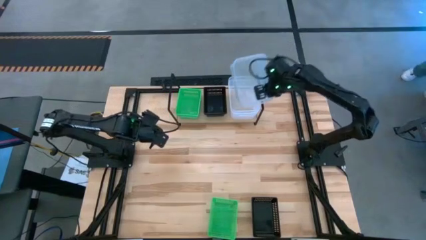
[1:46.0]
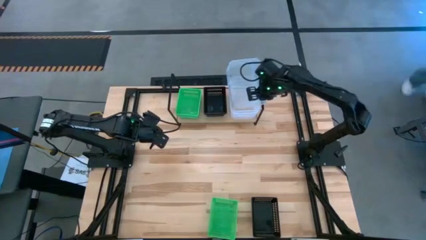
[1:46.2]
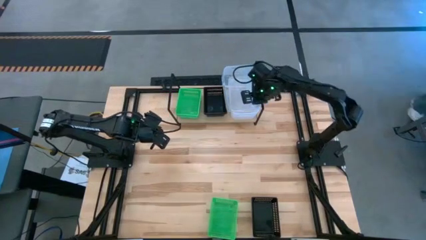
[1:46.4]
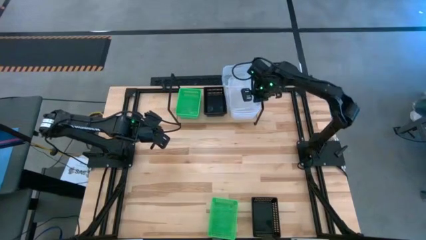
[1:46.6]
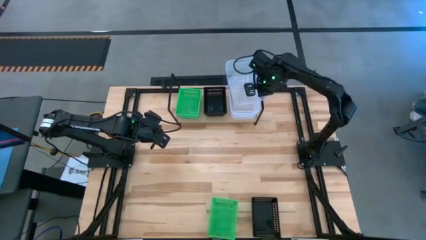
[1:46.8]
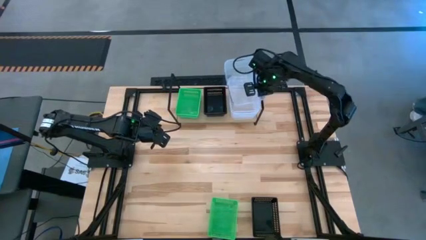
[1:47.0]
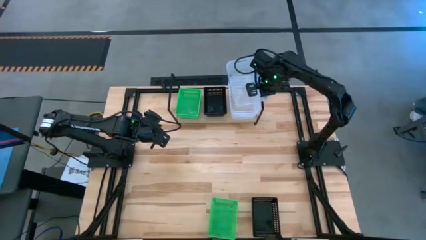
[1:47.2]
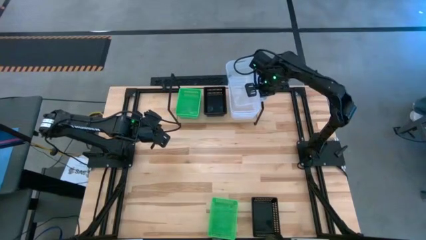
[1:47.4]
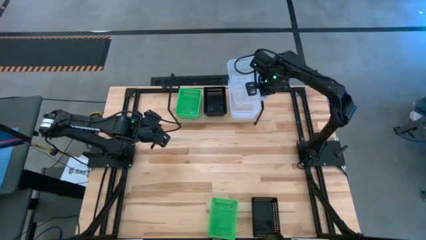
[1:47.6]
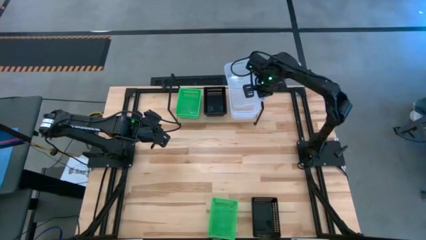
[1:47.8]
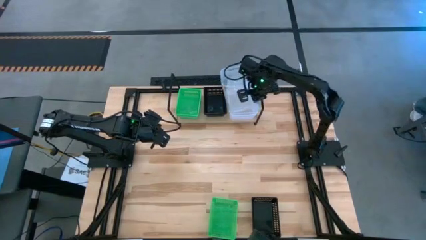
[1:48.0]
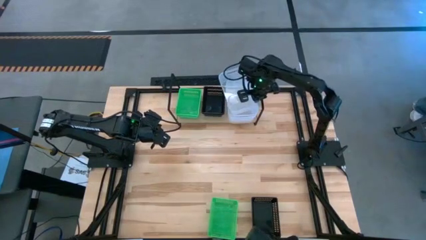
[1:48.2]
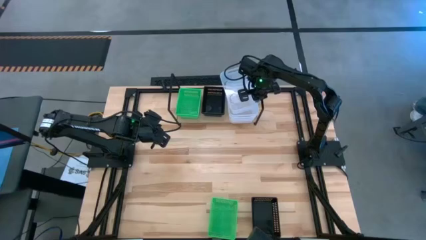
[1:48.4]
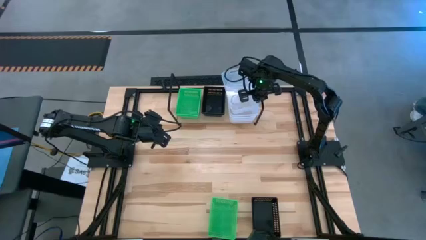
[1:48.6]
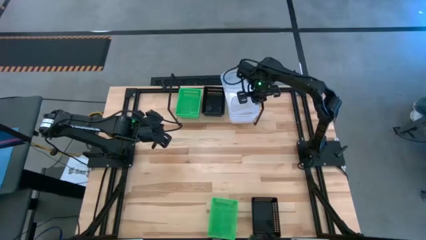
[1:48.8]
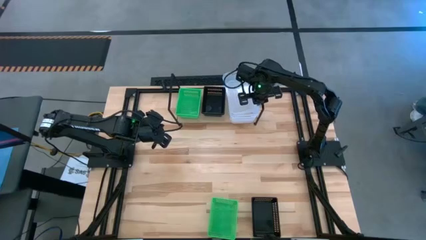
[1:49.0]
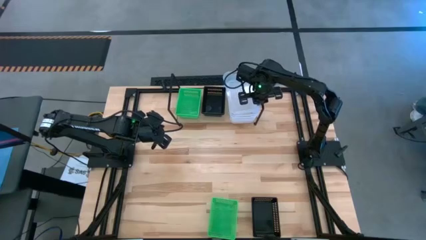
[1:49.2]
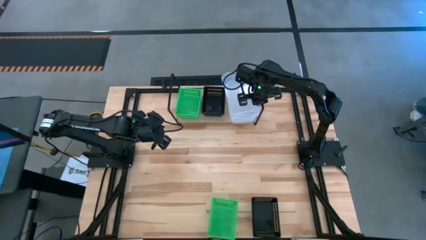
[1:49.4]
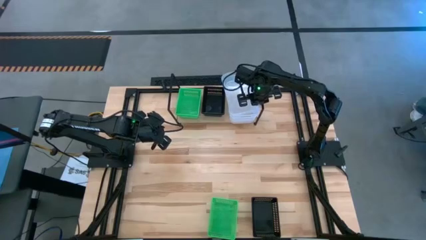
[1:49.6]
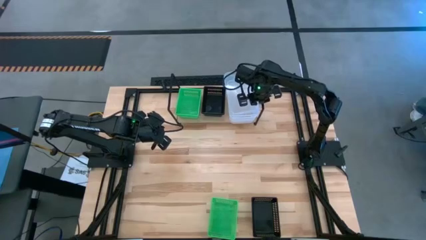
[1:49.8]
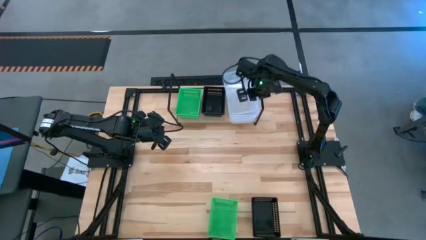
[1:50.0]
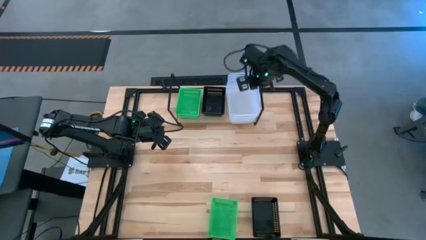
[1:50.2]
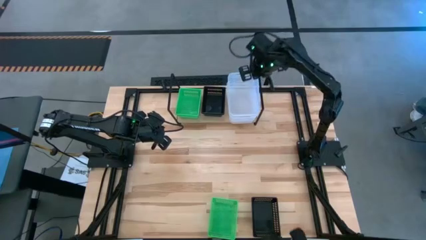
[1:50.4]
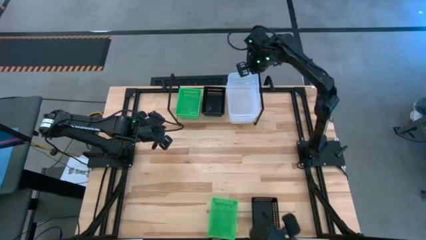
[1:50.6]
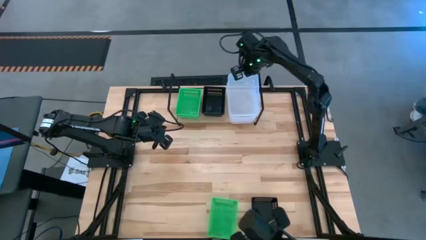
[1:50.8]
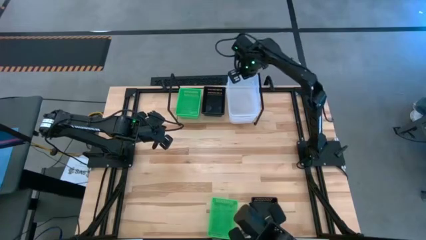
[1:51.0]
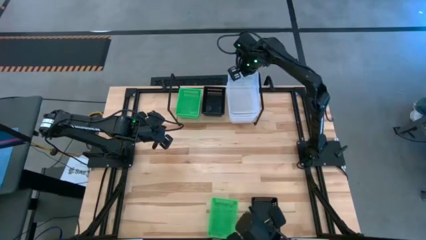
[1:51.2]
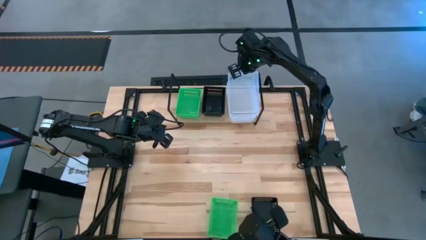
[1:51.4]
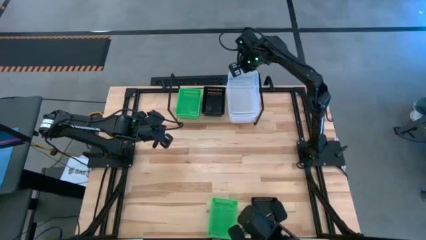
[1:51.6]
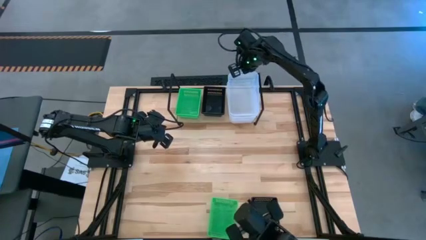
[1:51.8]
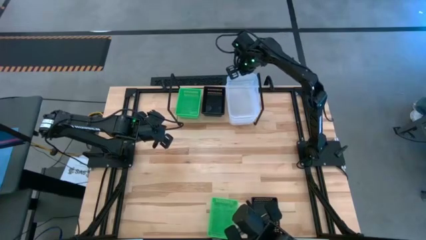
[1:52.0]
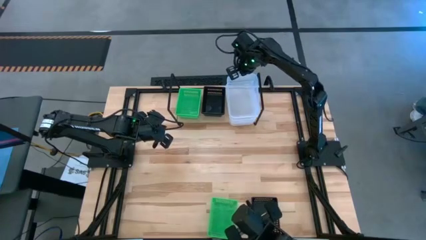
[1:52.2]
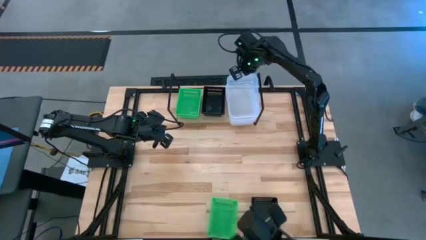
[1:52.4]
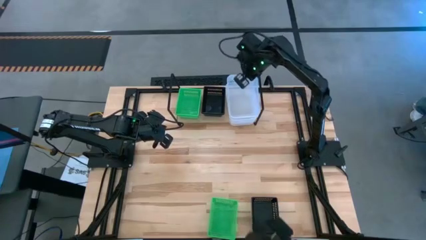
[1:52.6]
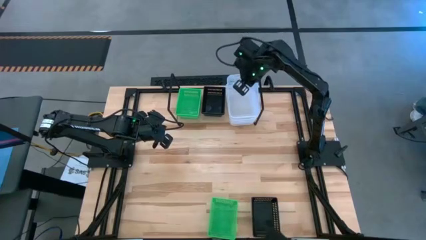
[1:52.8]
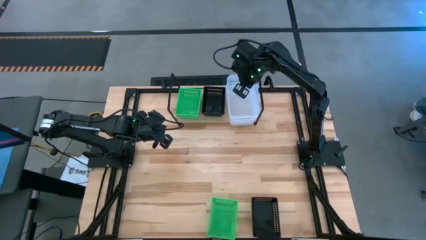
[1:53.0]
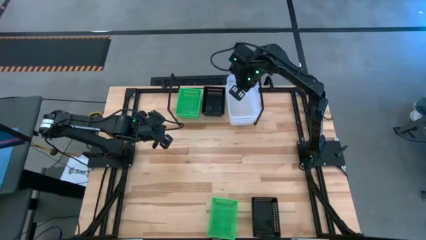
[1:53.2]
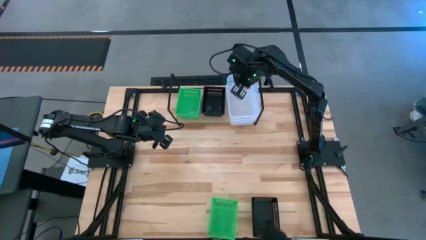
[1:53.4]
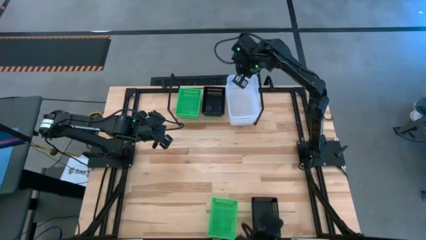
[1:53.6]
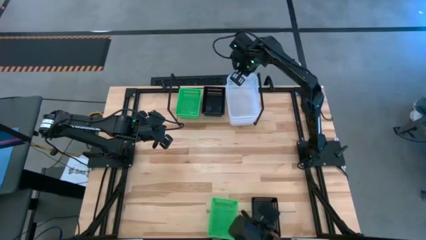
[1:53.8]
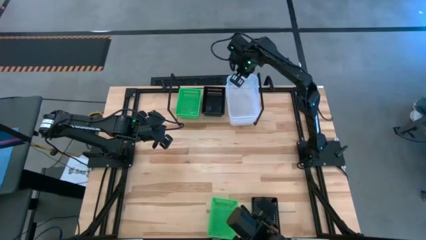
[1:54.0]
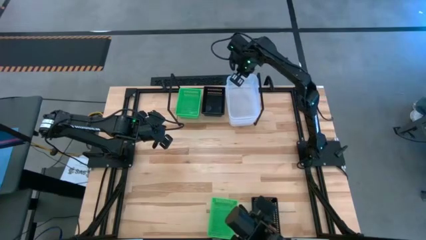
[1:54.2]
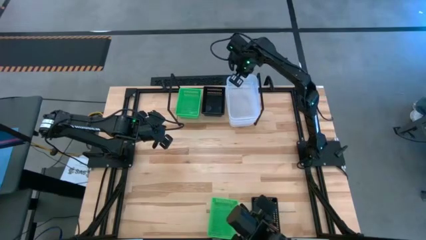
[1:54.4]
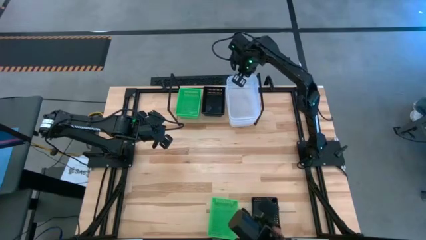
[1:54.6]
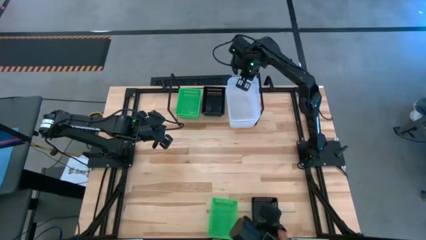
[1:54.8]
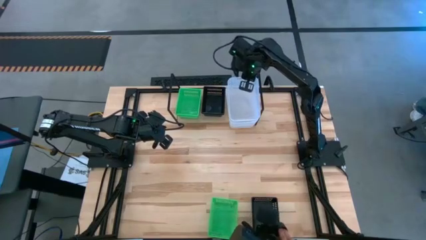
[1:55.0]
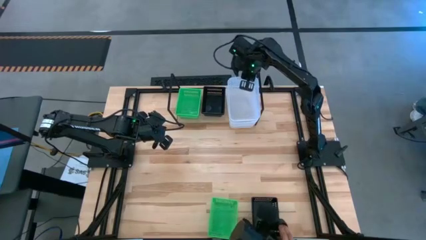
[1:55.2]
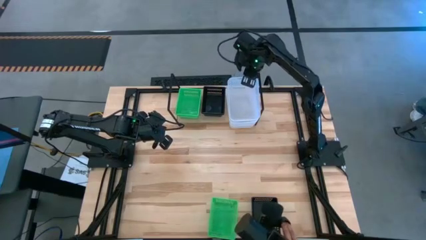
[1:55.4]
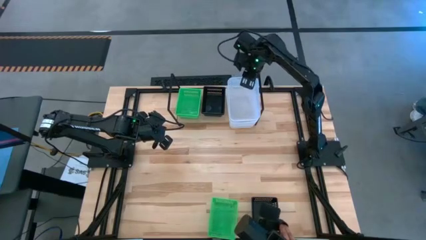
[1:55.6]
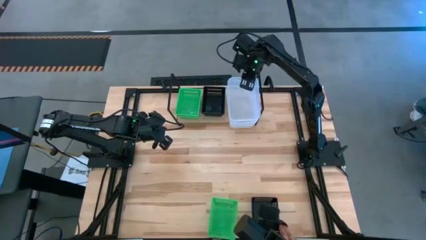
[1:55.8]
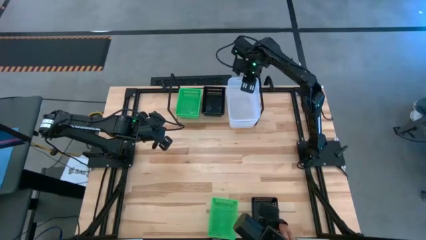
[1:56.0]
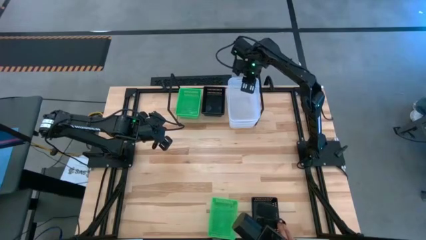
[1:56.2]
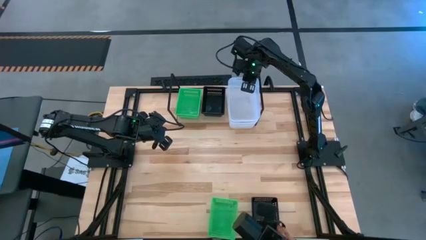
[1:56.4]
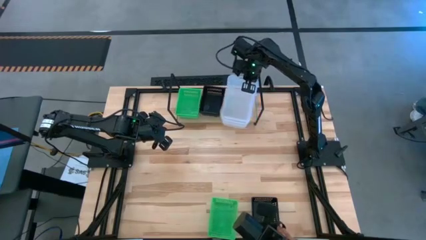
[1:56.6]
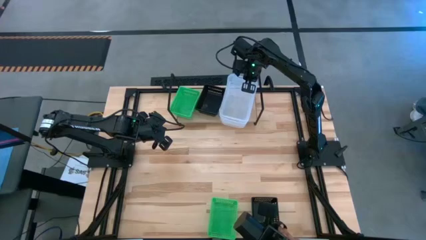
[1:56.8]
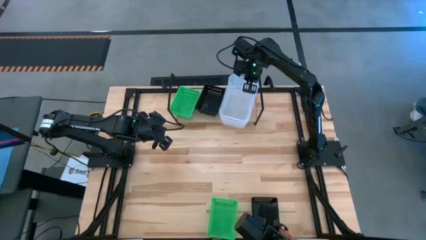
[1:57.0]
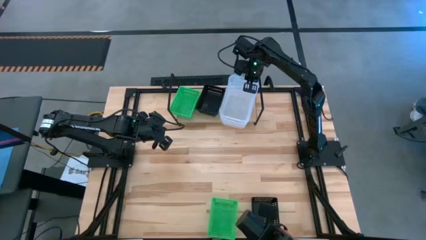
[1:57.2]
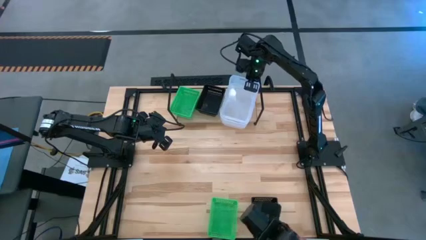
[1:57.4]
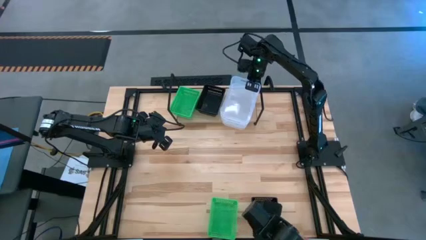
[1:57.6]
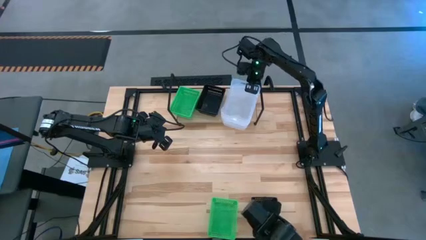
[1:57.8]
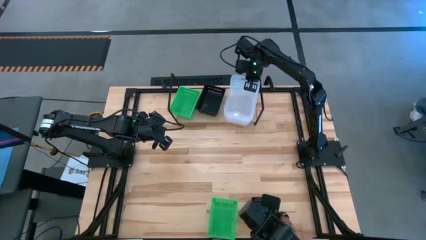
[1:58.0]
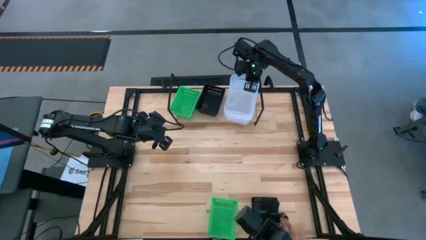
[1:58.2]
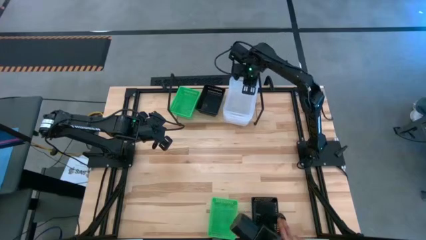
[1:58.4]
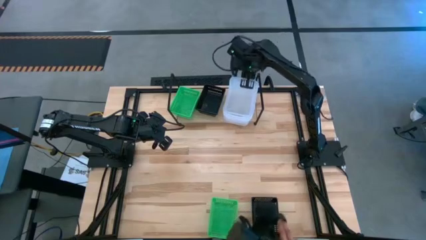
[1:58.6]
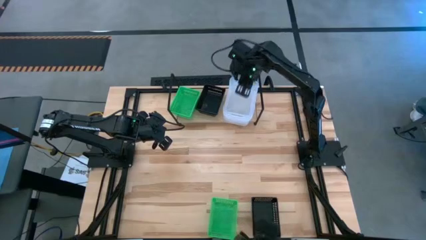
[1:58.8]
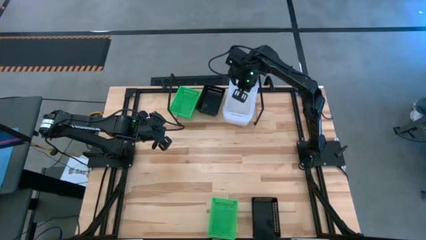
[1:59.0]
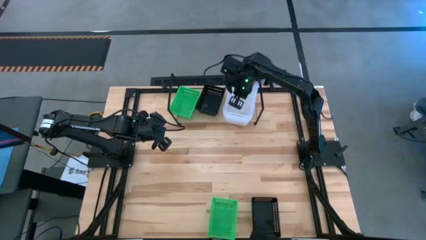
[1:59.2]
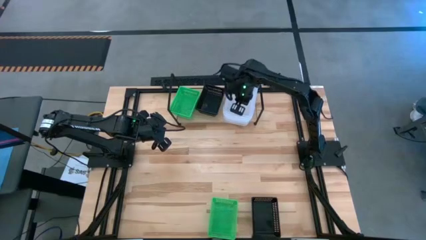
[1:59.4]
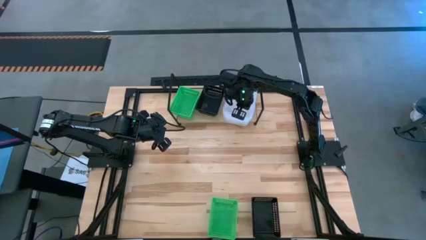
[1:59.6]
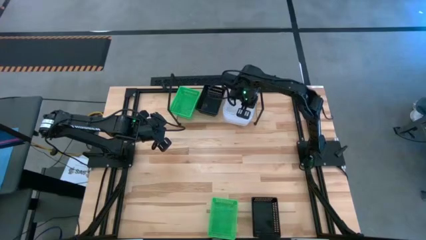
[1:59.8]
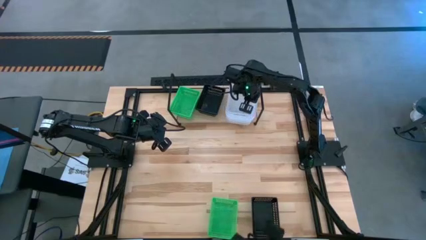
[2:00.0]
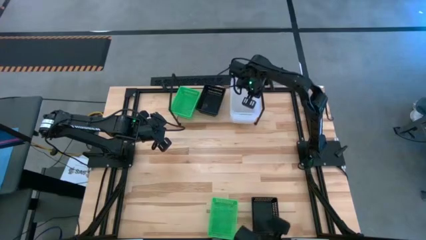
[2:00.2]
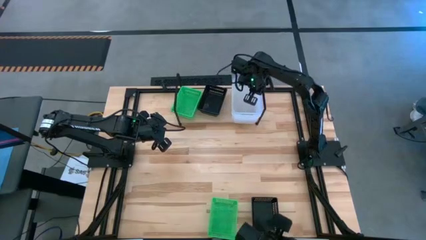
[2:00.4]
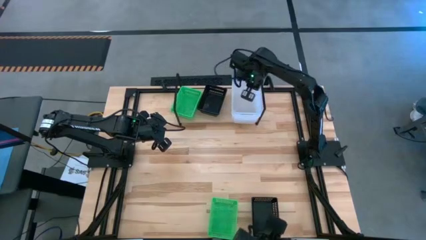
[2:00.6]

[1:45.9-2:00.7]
Task: Stack baskets on shelf by color
Stack the transparent bin into the transparent bin on the shelf
